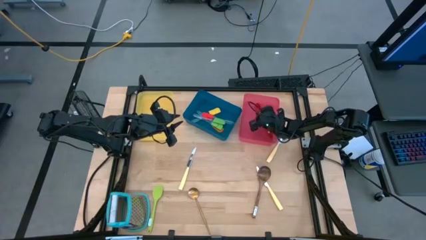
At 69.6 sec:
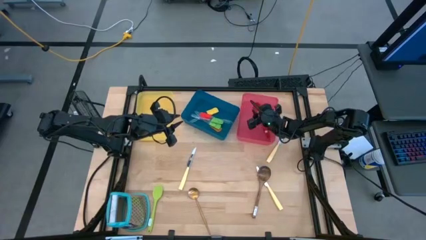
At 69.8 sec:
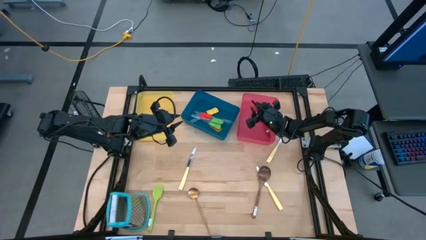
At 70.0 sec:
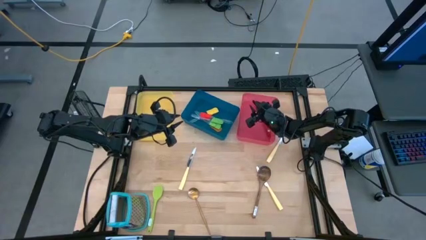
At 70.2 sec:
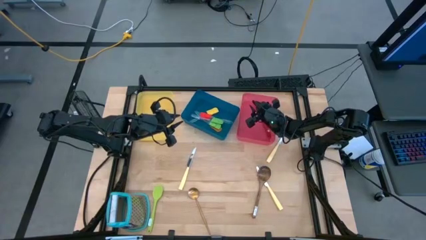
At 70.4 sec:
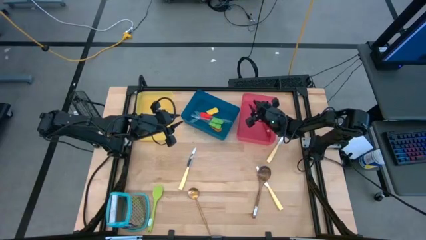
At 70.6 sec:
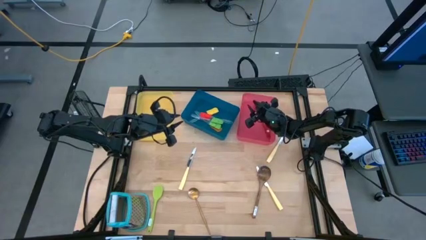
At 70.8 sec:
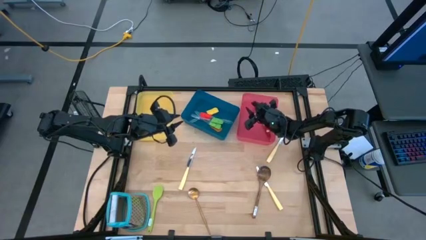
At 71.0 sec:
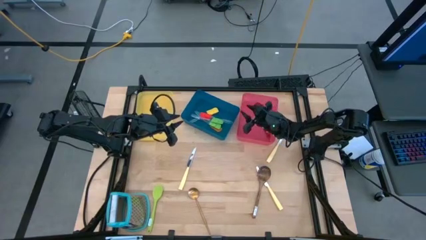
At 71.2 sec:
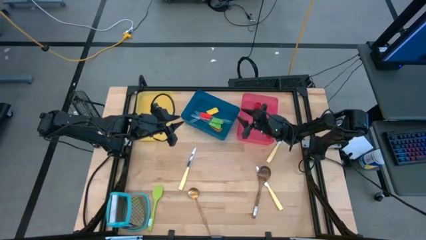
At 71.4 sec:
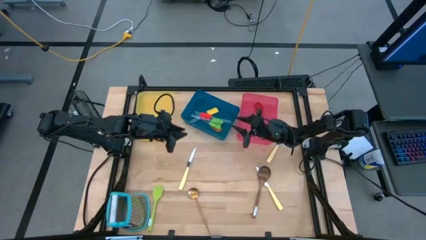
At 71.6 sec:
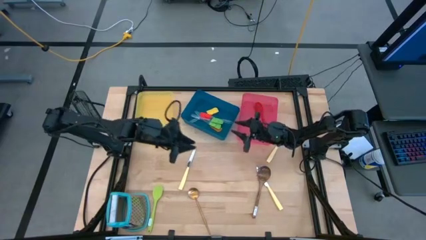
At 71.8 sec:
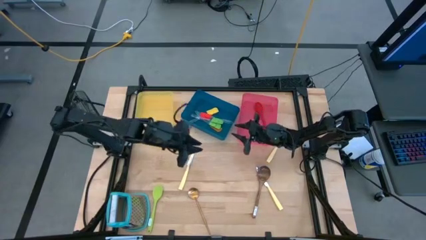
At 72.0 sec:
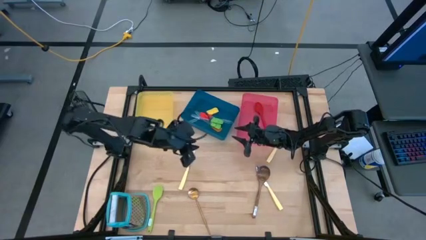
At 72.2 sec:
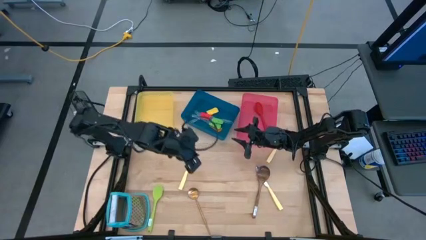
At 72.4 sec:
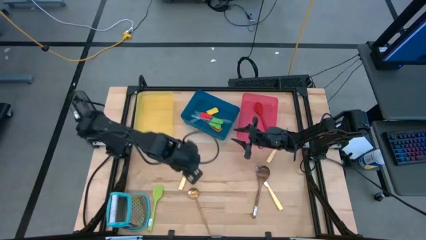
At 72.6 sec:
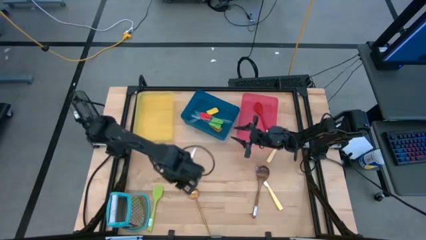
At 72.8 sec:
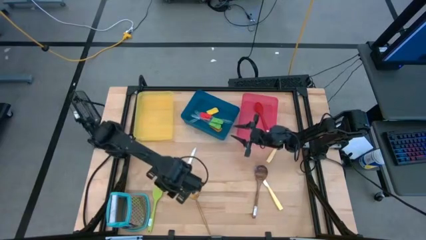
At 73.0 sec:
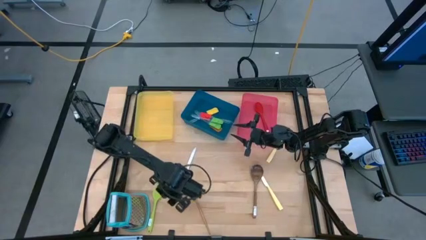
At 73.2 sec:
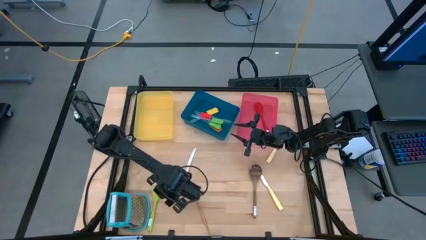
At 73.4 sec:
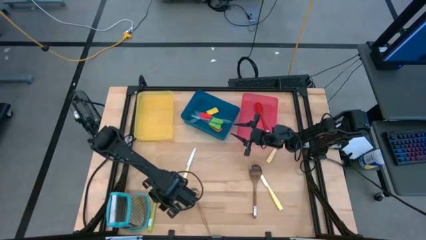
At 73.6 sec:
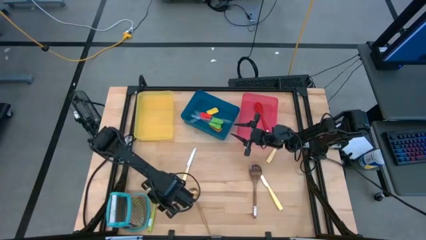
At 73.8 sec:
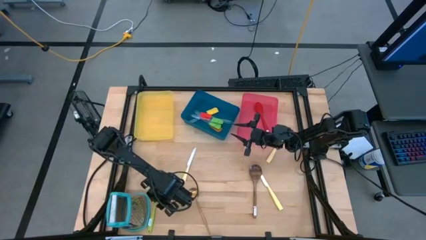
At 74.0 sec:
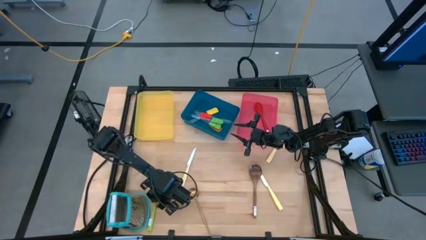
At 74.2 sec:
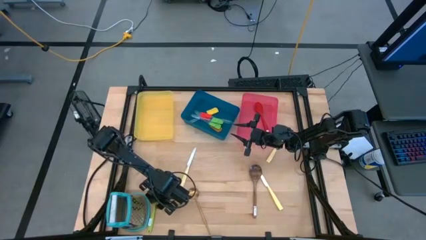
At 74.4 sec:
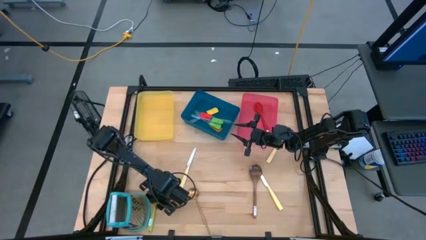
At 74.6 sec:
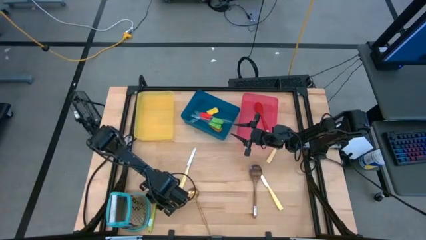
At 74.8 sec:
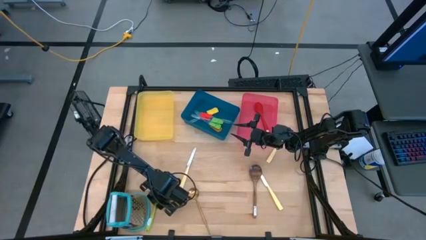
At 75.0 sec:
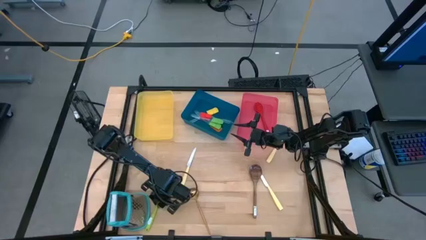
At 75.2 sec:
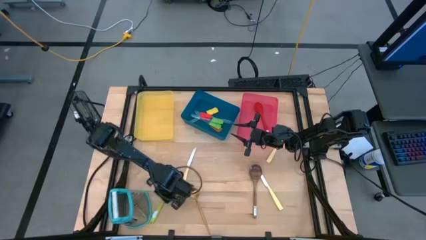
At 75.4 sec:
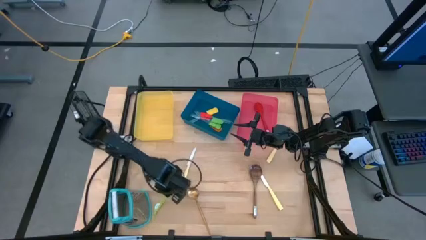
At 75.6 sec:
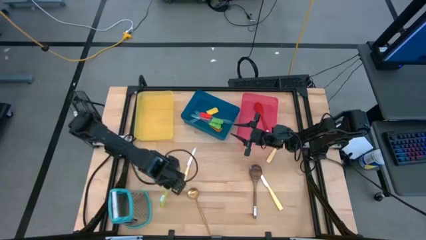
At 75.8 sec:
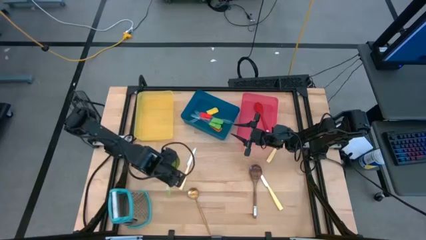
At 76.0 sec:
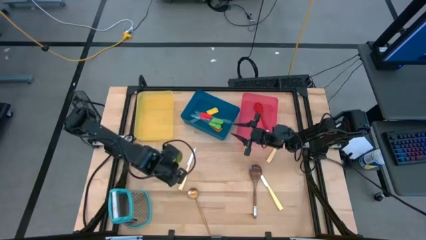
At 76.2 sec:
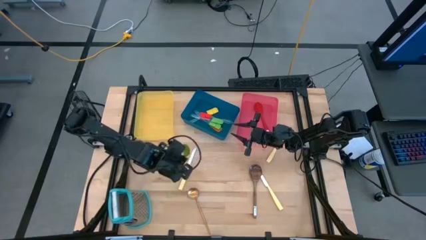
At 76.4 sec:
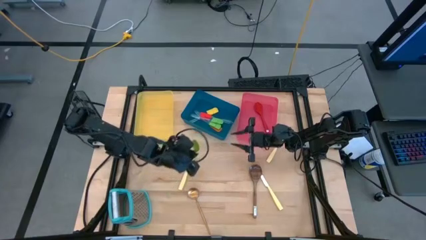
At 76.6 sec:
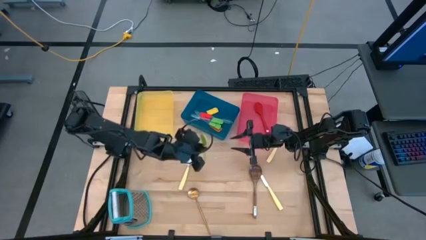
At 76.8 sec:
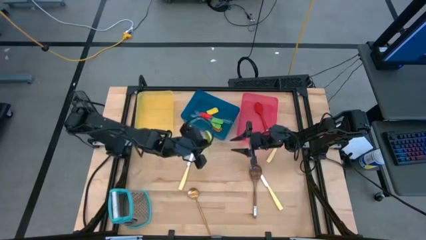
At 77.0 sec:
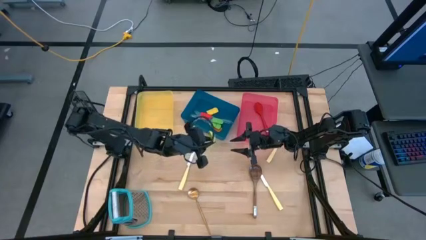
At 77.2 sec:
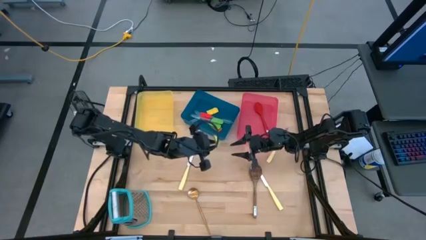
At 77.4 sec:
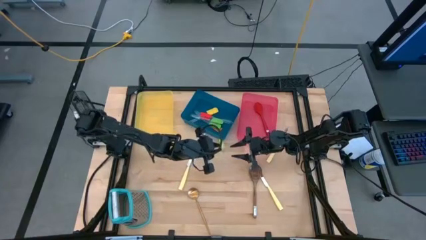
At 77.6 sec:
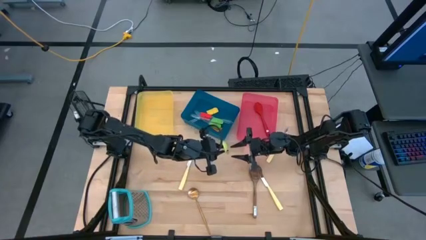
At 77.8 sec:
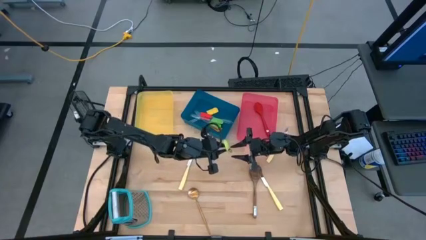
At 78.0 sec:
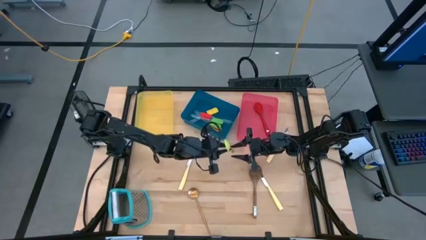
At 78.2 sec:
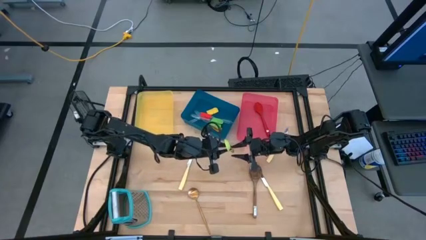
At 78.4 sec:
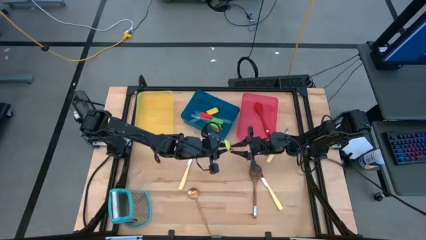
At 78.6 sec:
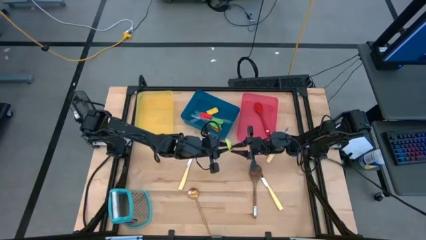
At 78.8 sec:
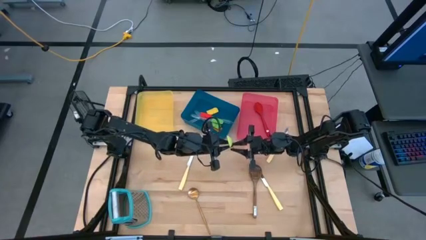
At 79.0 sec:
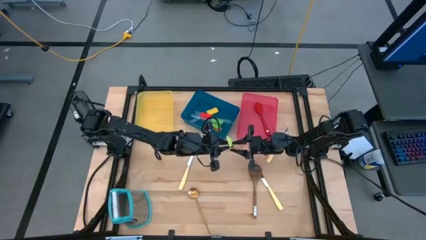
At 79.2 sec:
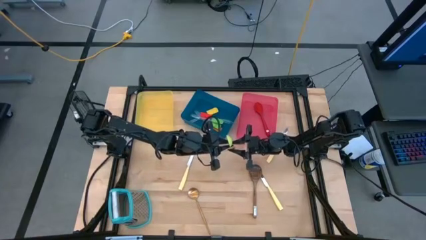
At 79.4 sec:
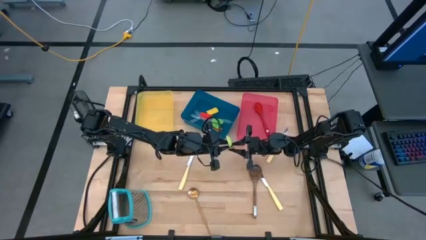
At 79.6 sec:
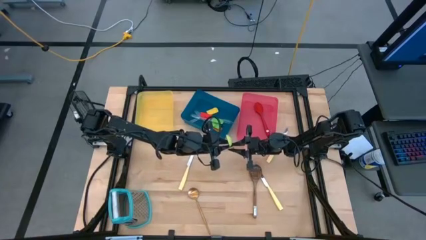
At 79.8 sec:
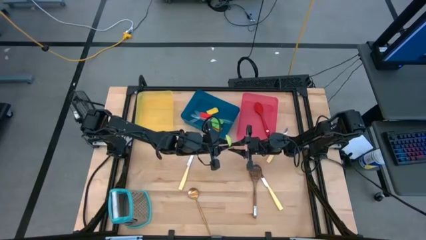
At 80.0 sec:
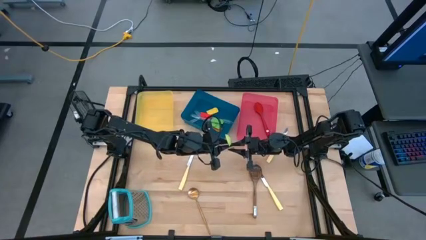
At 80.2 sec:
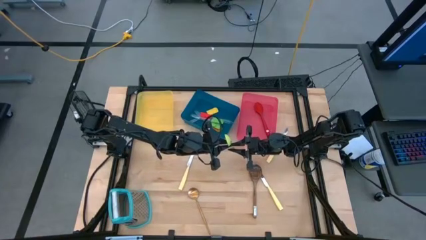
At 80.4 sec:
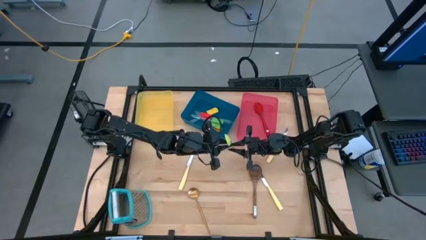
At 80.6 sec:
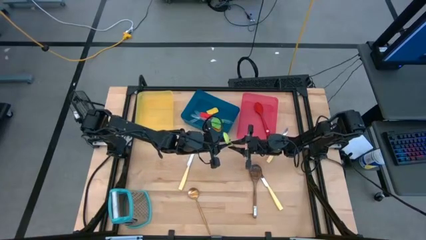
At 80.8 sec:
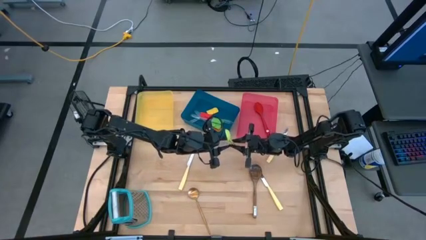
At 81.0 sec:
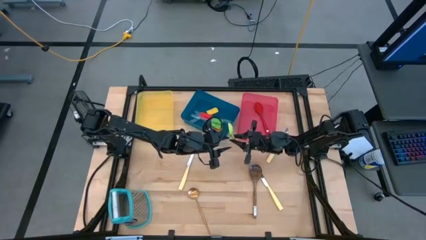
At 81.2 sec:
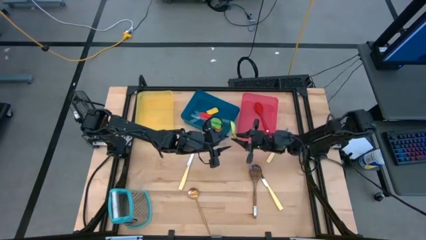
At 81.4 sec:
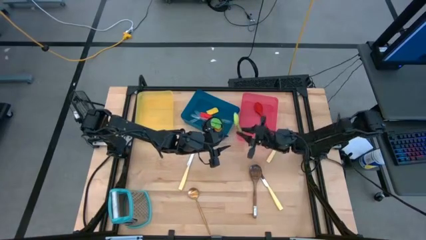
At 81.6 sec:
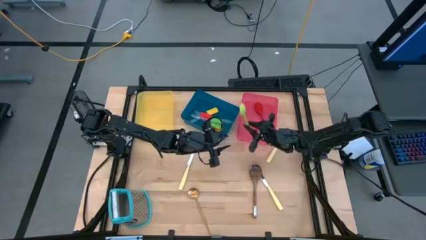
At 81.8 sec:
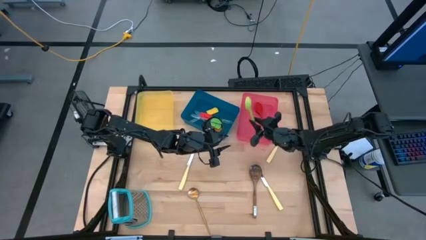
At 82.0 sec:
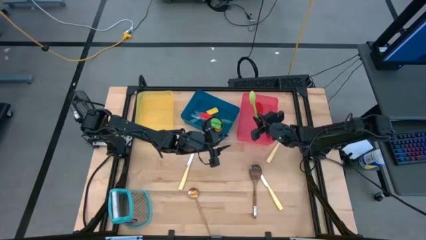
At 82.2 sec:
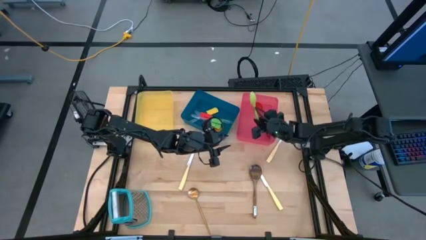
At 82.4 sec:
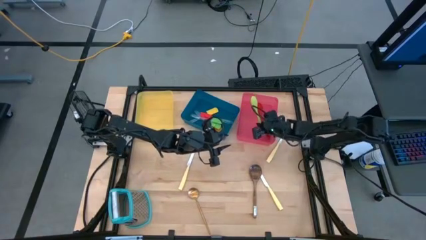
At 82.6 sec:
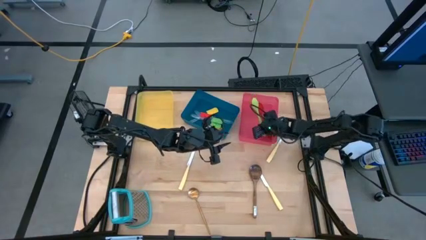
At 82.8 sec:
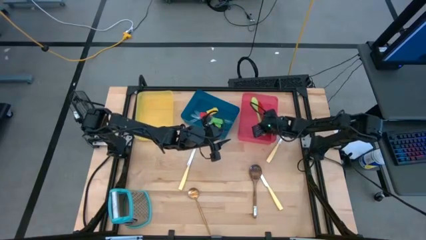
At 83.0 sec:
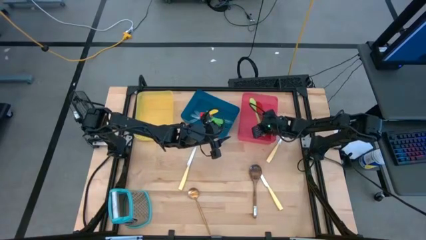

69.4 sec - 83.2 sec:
Task: Pick & Place Kitchen Items
Put the green serving spoon into the pink bin

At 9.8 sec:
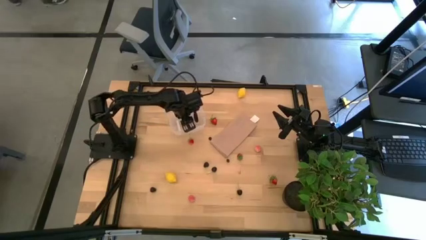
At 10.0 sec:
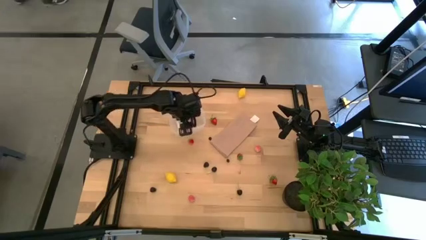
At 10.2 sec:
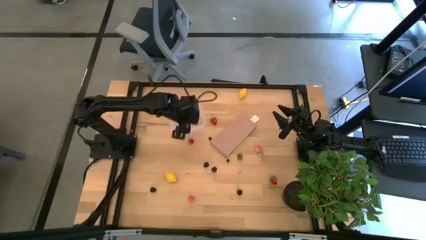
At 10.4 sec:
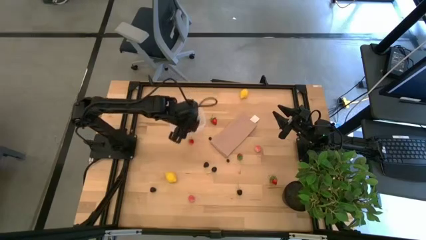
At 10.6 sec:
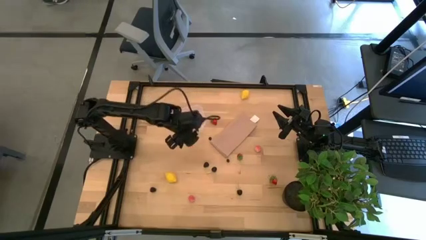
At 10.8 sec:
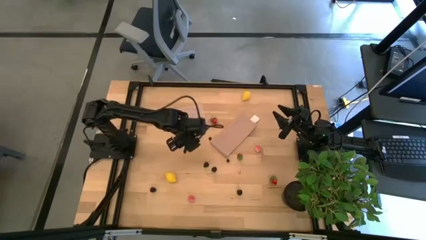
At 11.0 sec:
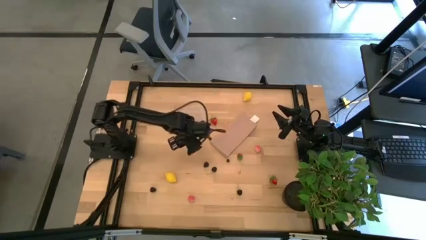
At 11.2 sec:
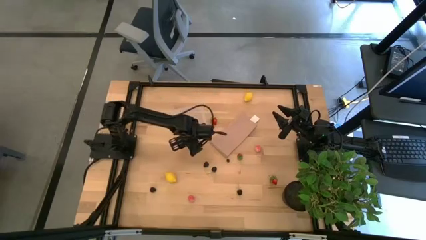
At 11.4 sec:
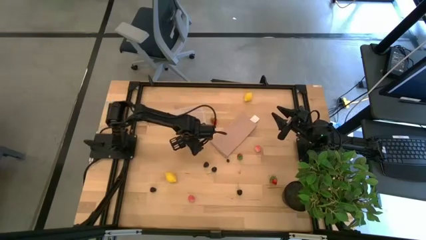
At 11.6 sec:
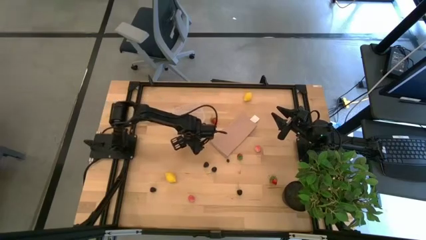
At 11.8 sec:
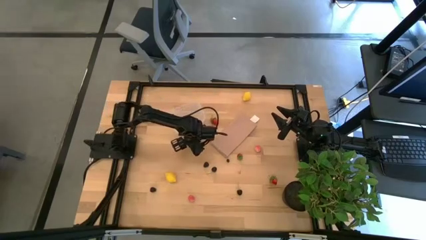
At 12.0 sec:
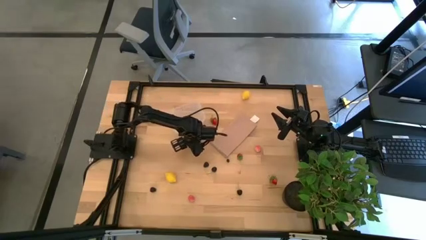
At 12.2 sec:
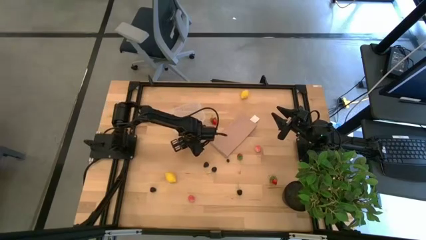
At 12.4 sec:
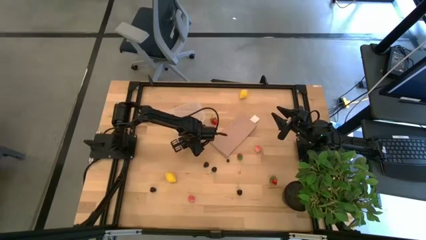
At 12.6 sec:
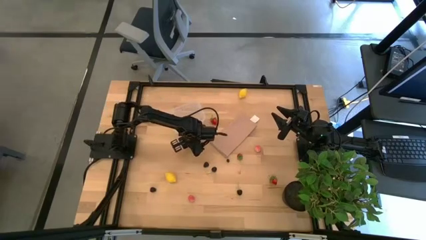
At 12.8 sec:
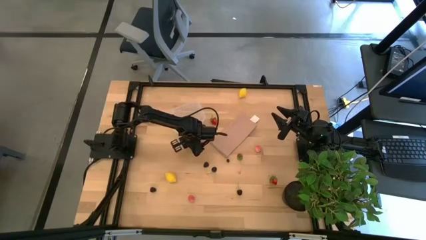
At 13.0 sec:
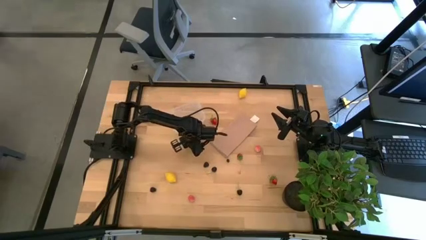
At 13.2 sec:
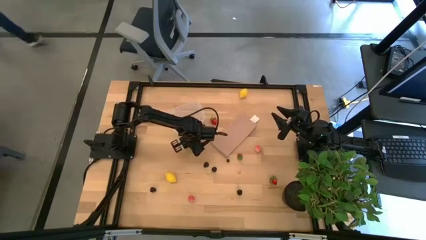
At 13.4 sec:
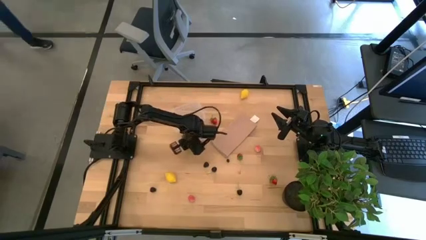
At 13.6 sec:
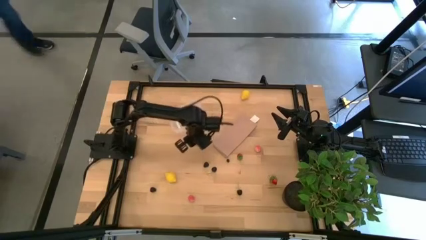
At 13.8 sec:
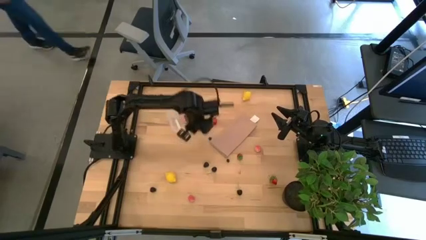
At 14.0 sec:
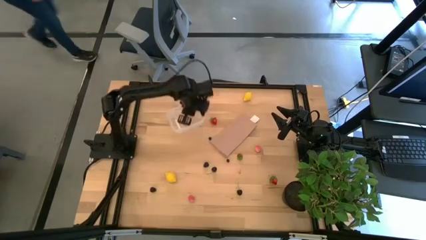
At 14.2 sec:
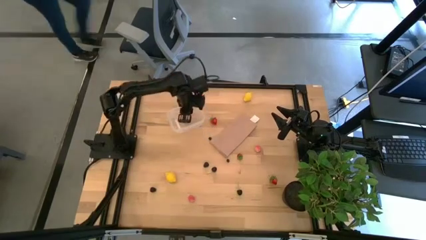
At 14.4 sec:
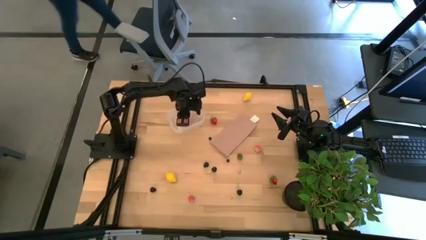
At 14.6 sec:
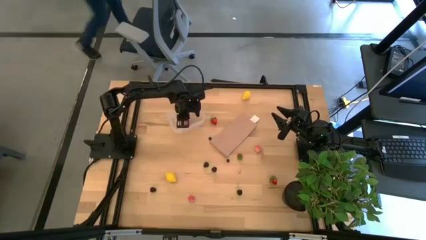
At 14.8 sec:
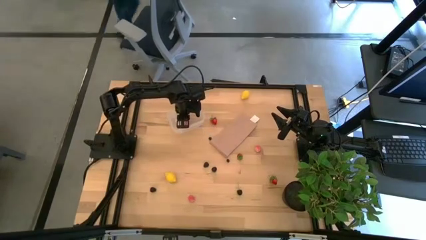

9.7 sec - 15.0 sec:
Task: Pick and placing Produce into tupperware
Put the strawberry into the transparent bin
